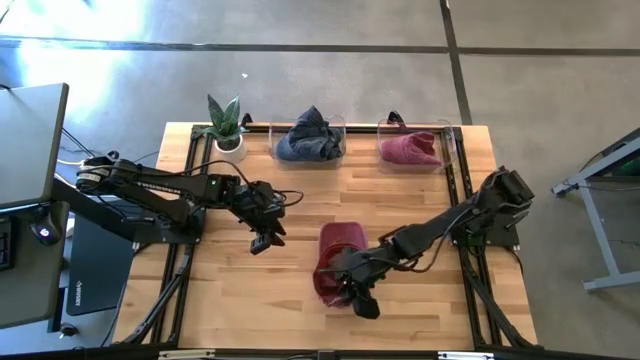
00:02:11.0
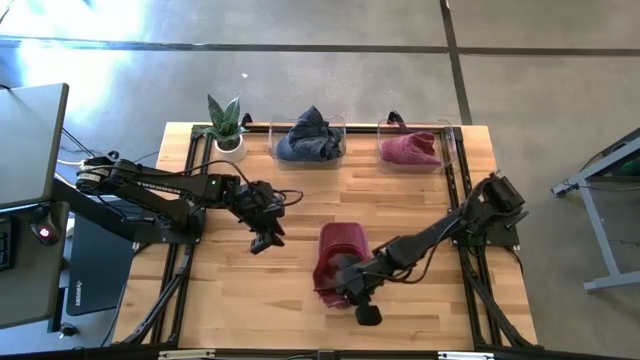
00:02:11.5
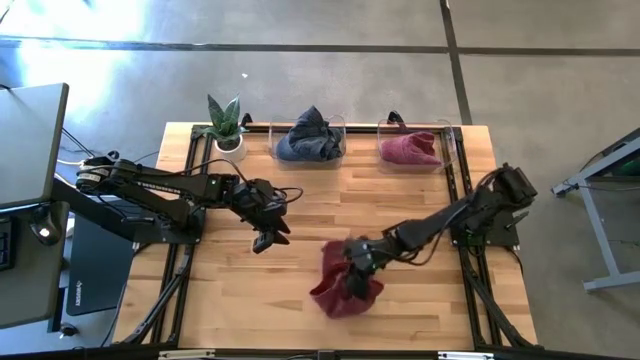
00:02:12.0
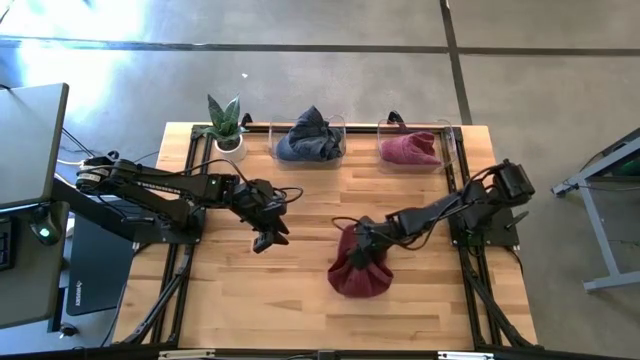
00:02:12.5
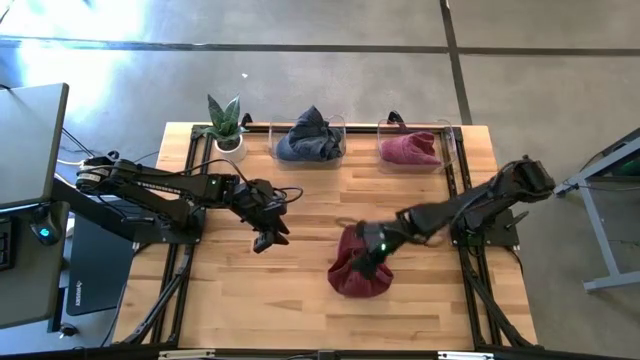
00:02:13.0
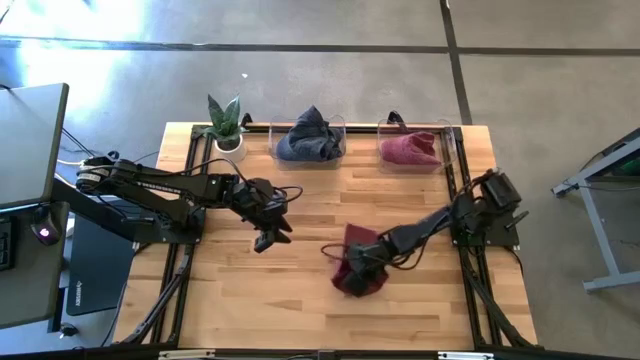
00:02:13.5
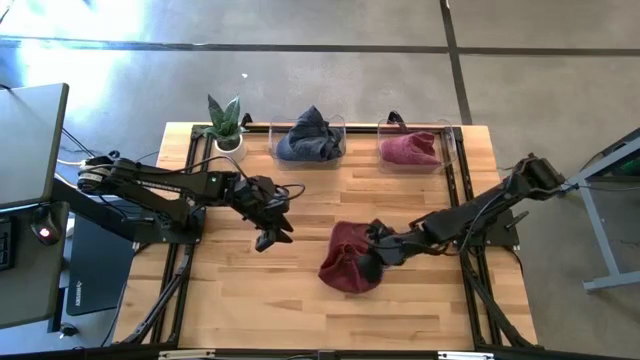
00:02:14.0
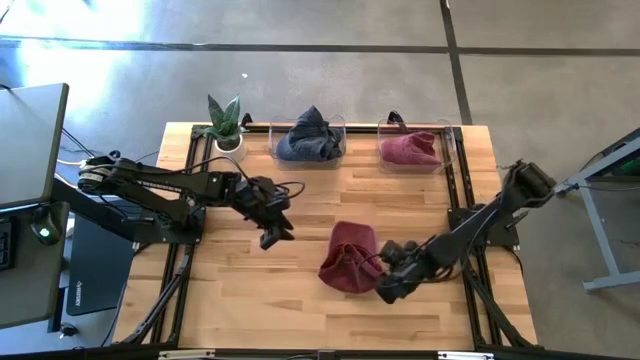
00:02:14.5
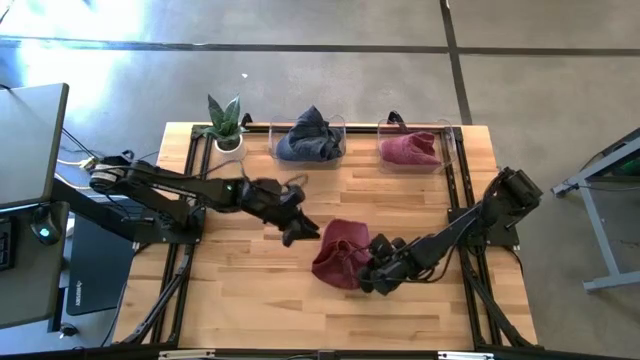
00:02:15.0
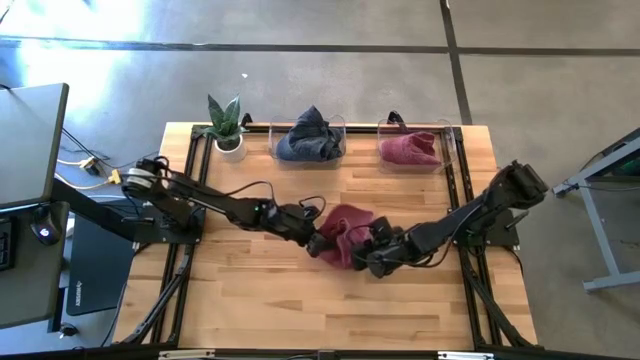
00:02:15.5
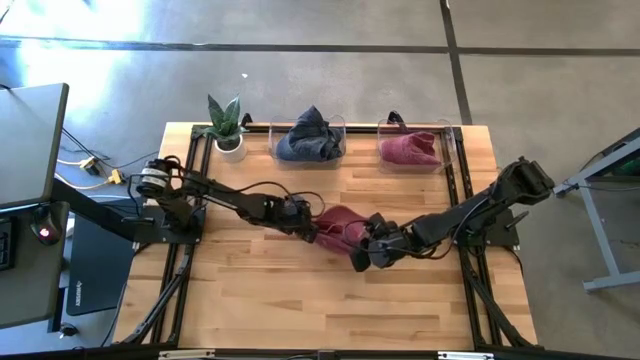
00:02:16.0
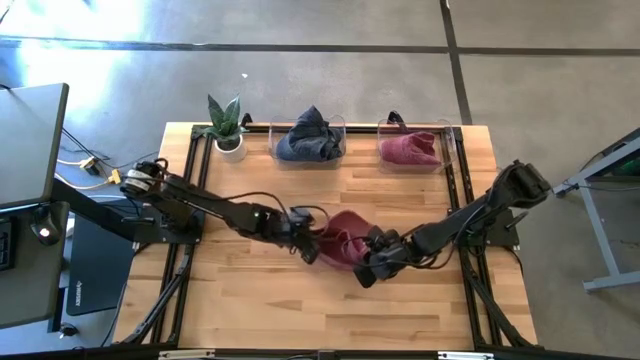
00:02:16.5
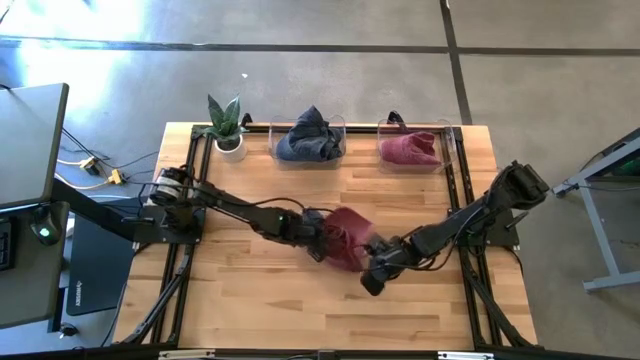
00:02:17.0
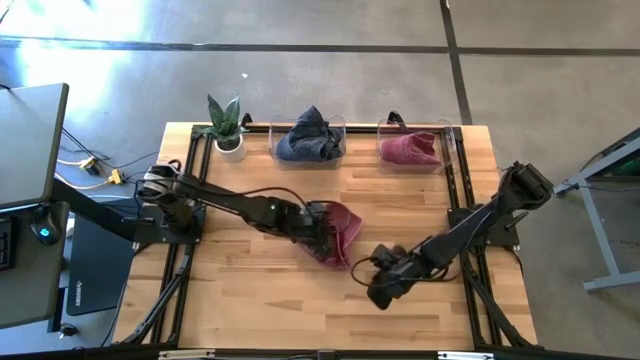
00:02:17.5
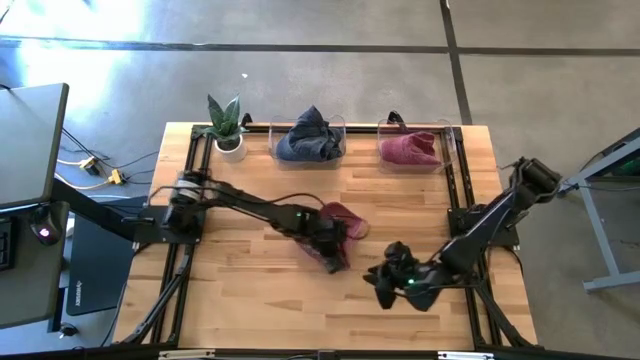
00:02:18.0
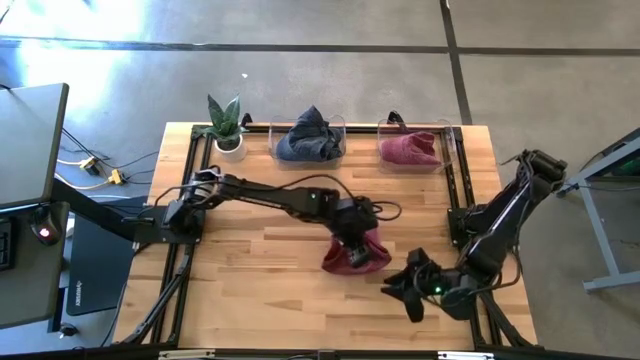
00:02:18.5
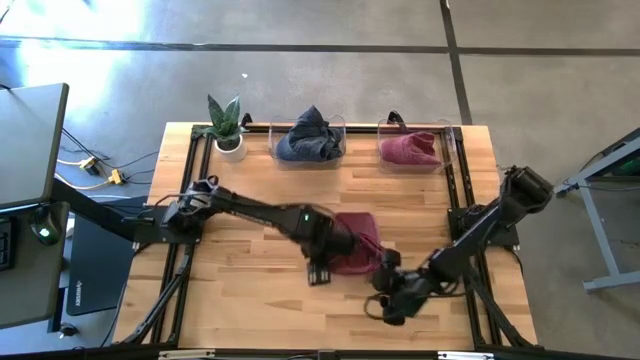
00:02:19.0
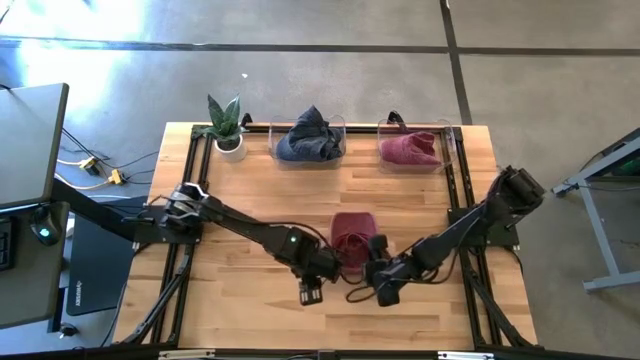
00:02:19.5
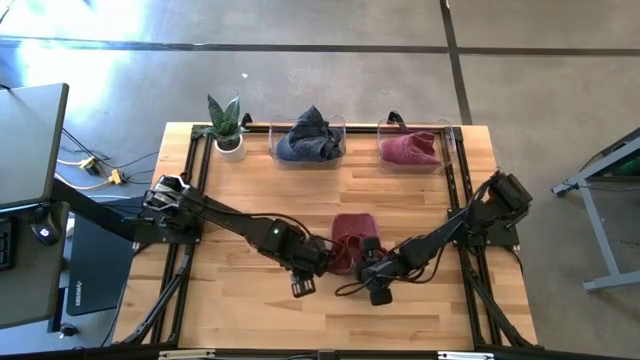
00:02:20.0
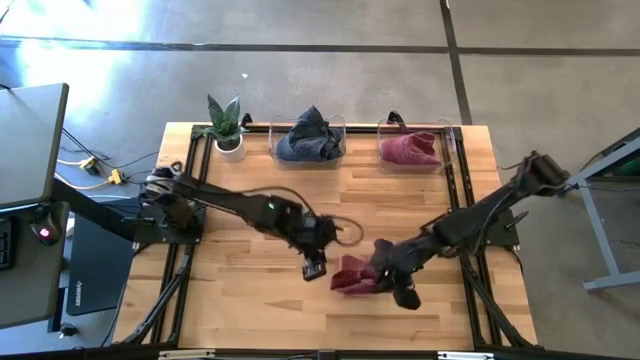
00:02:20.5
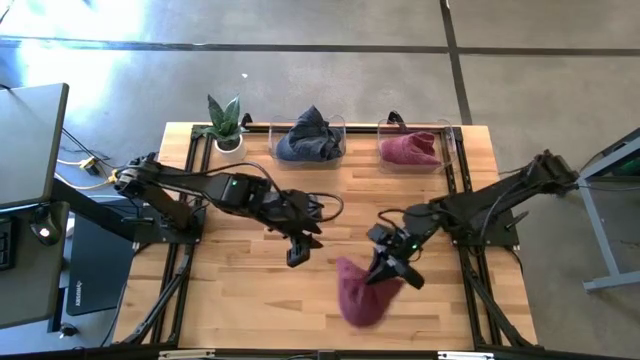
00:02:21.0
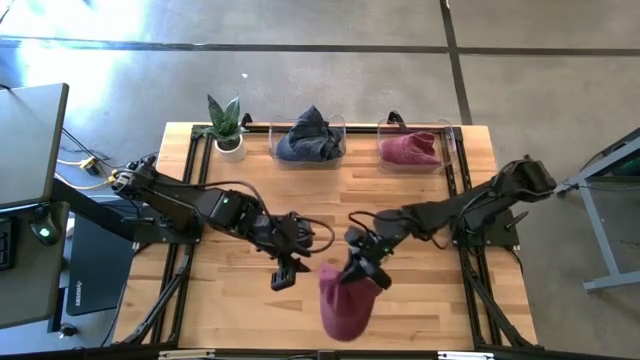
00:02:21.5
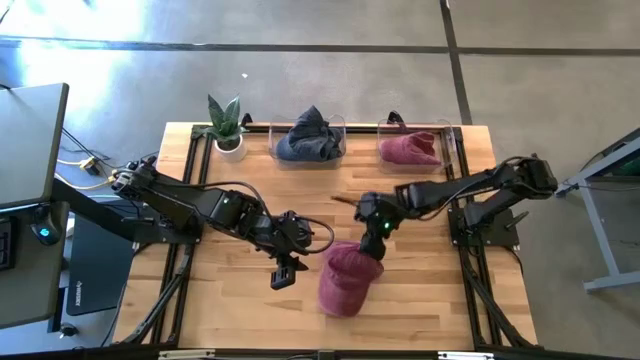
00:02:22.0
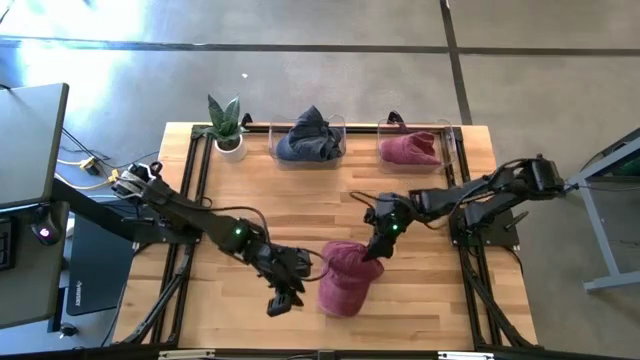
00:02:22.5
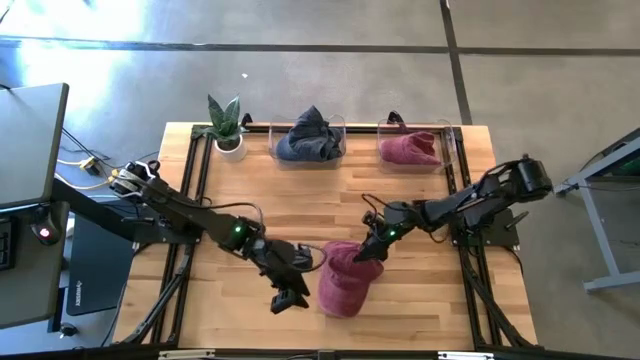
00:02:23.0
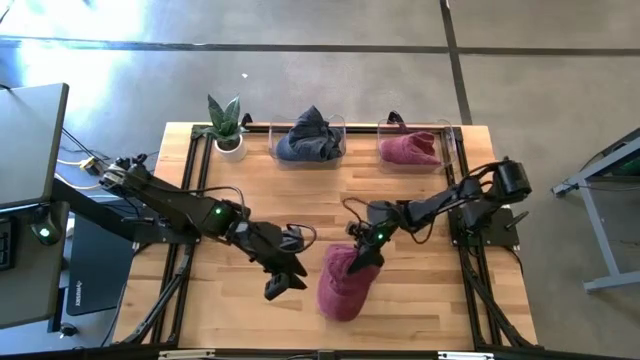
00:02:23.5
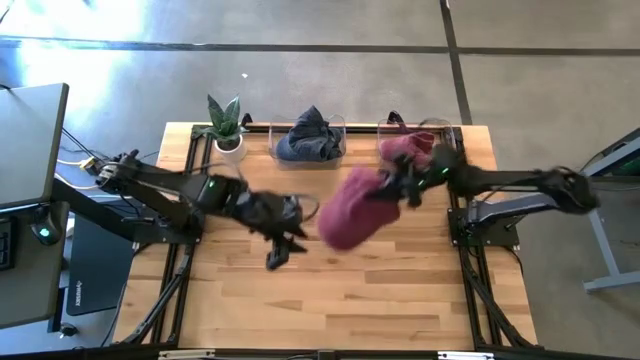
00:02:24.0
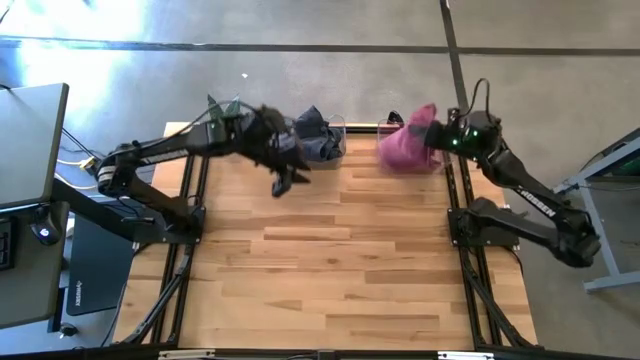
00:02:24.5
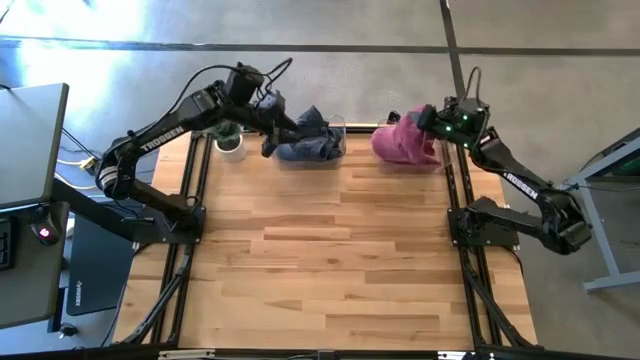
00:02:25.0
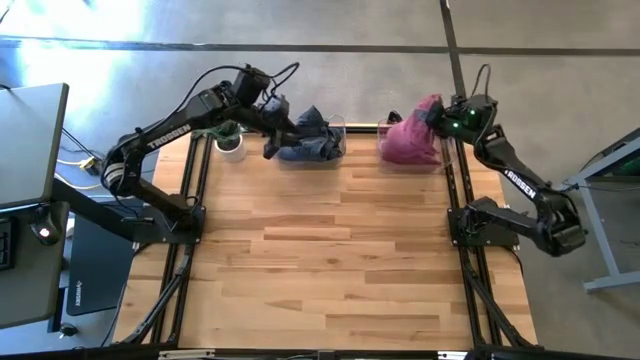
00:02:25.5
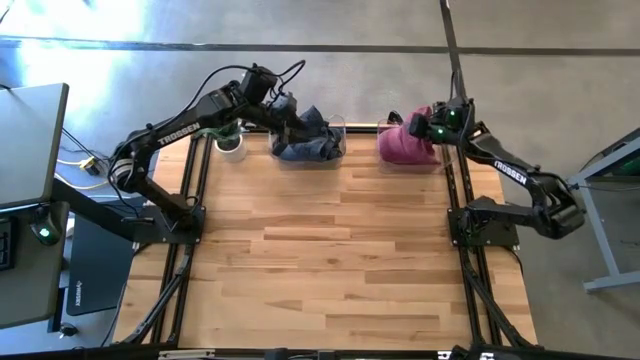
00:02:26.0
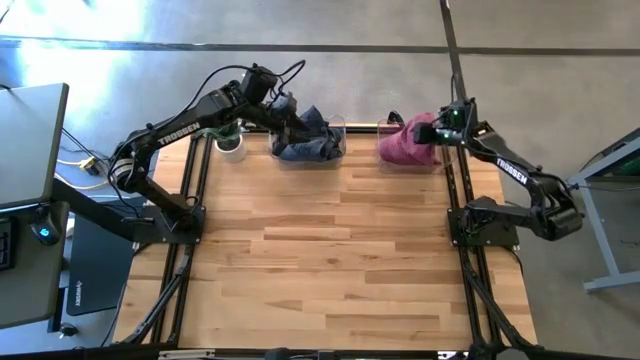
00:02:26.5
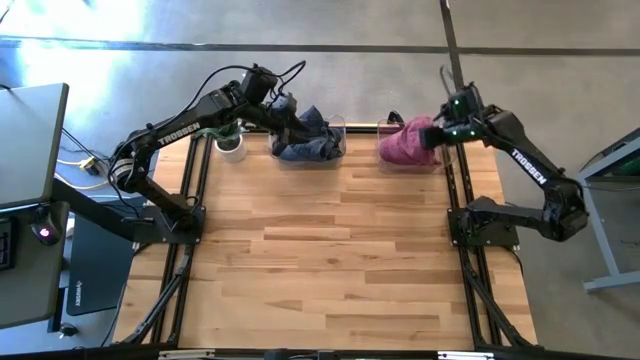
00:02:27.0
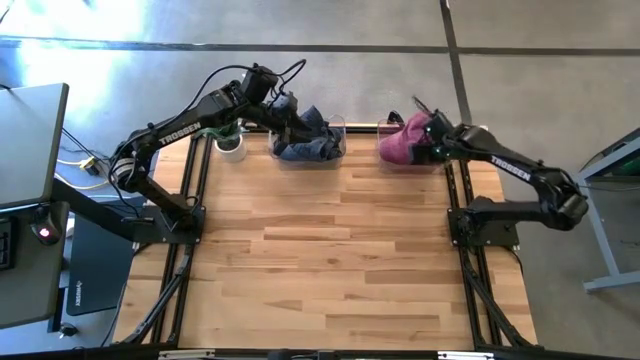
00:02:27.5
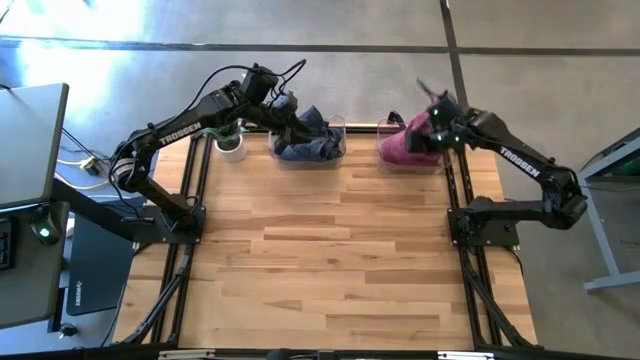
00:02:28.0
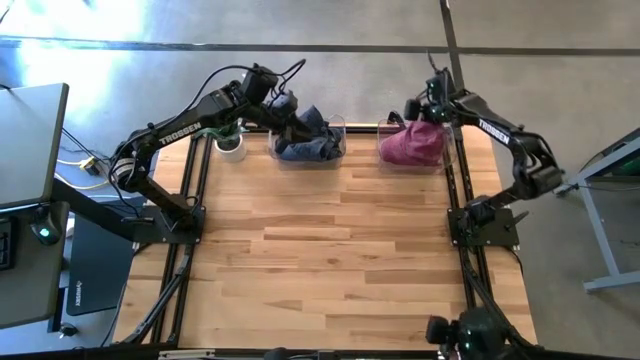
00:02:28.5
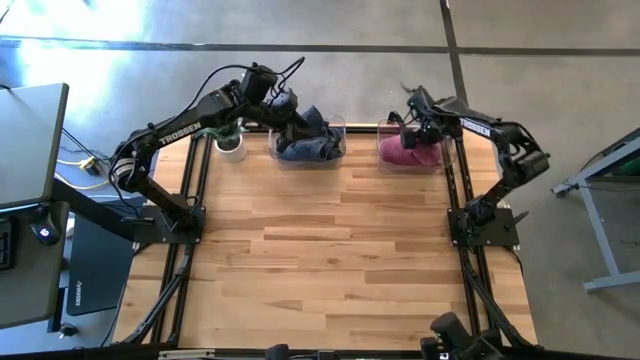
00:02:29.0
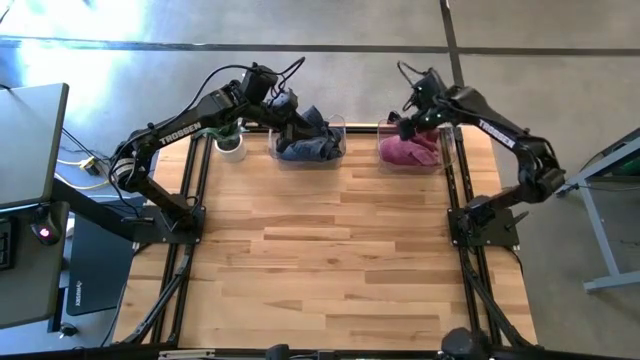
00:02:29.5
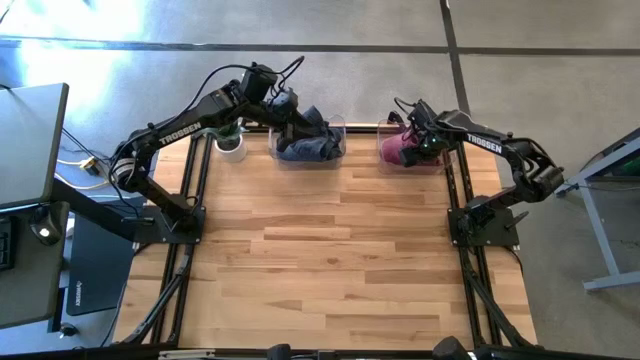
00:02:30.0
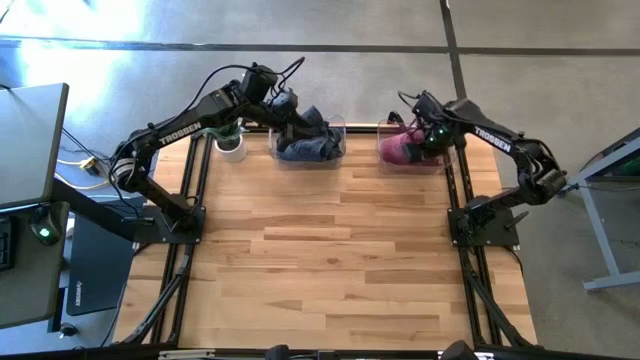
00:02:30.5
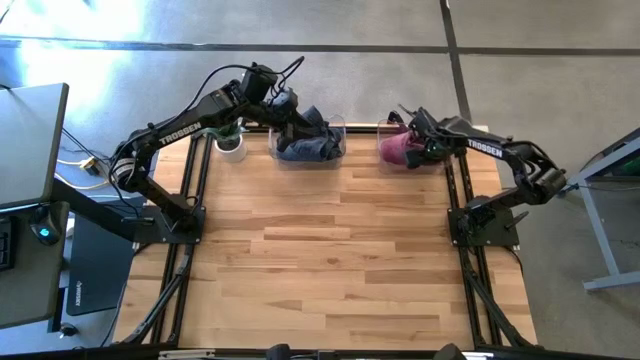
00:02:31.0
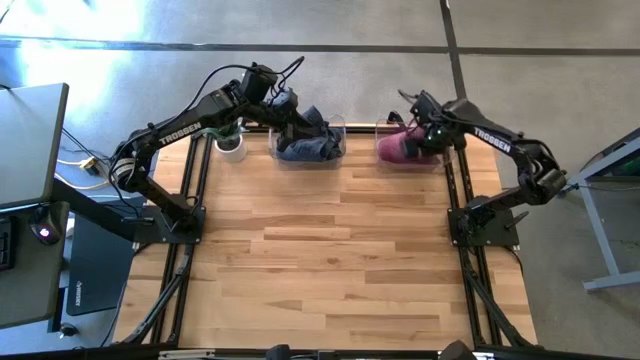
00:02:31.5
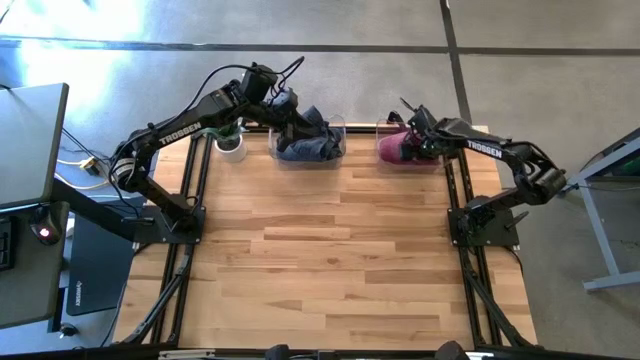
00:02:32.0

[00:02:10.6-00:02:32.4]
Task: Pick & Place hat
Put the red cap into the right transparent bin

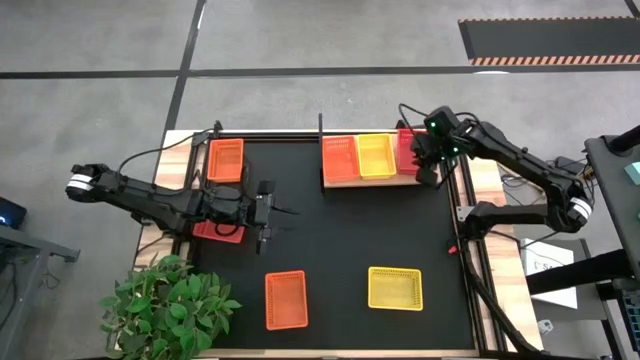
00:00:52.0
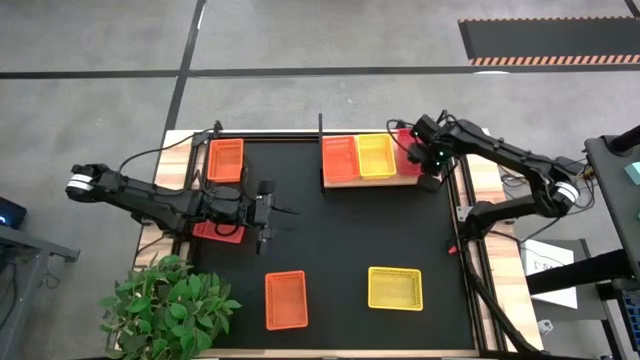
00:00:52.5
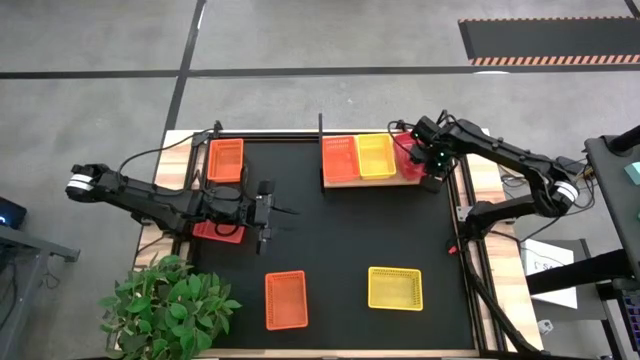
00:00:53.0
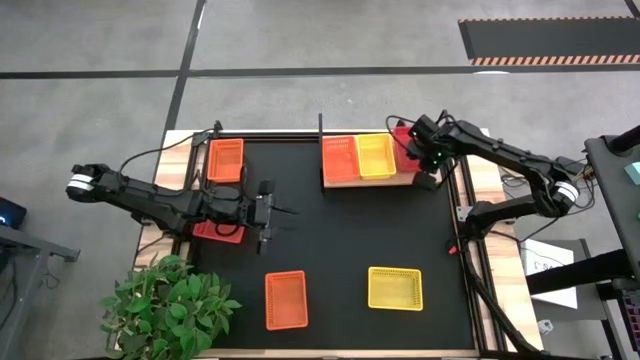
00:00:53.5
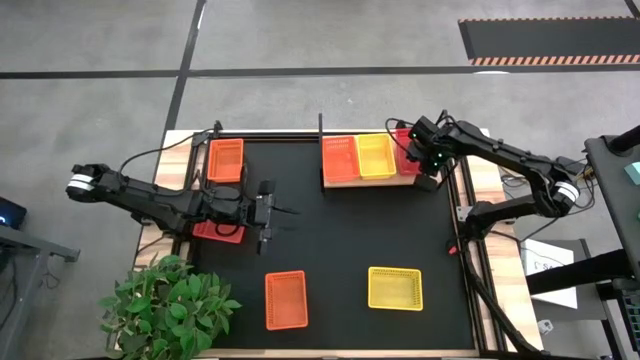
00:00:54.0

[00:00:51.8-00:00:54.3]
Task: Stack baskets on shelf by color
Adjust the stacked red bin on the shelf
